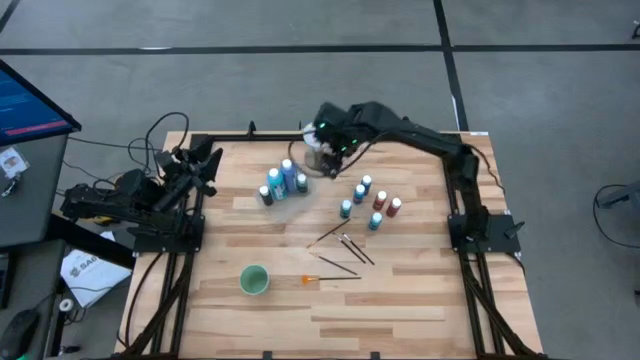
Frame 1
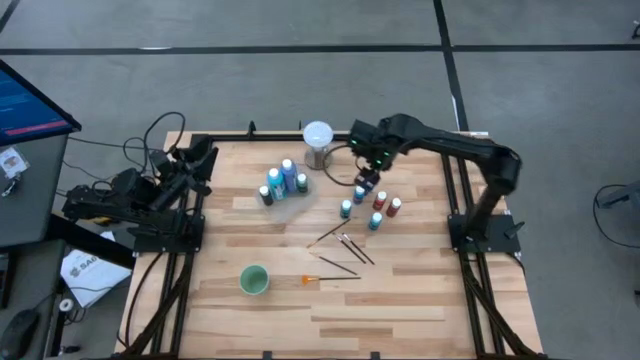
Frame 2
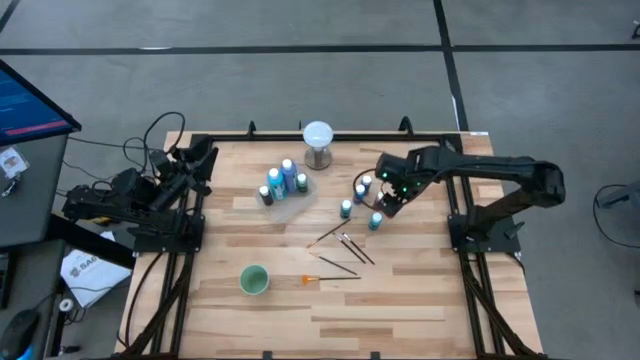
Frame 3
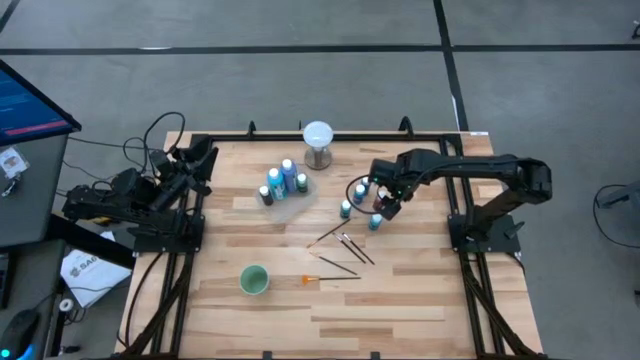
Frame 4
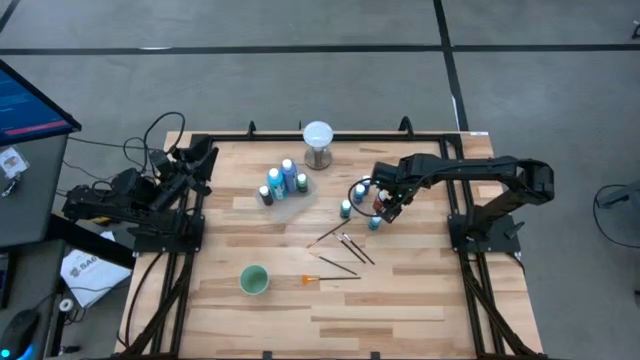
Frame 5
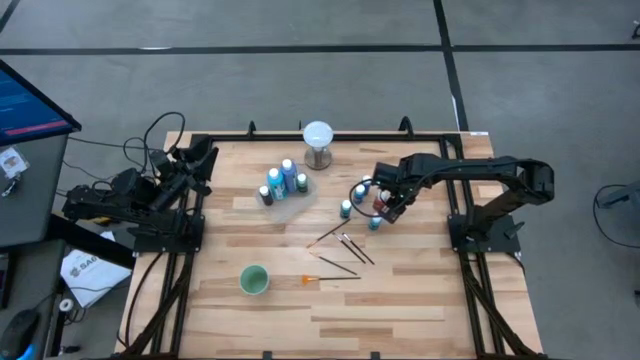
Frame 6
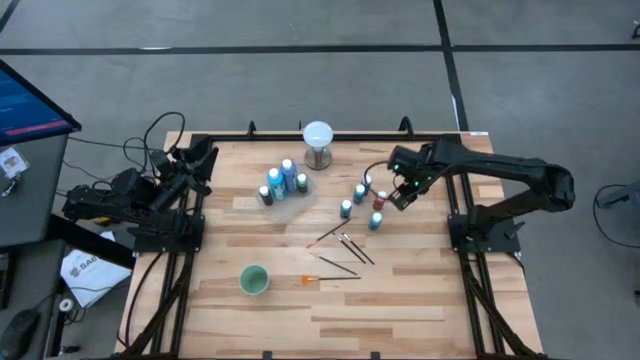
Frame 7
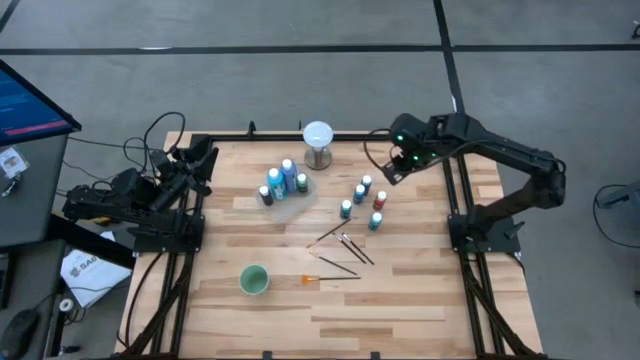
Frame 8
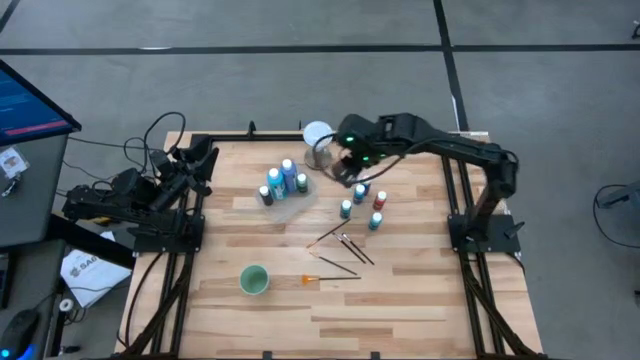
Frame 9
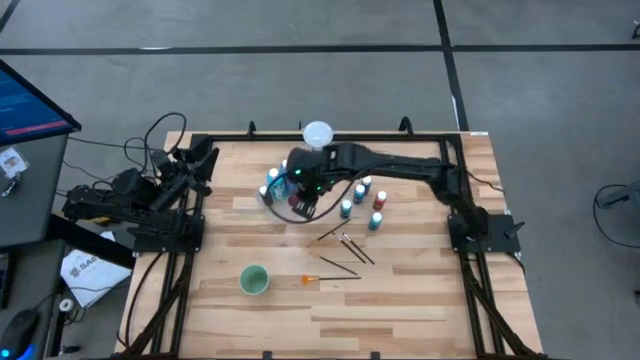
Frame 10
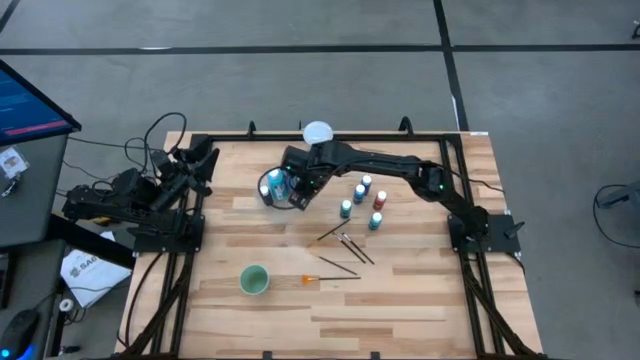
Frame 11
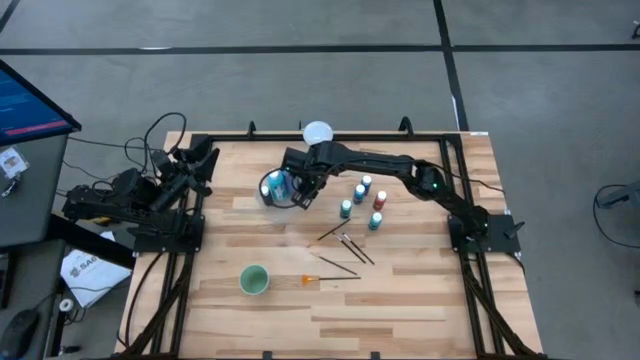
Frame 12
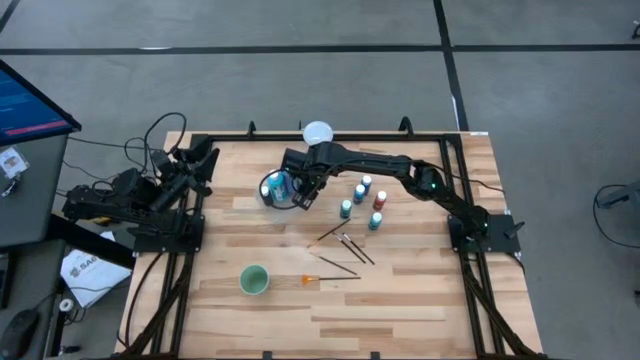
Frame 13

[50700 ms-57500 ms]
Task: Pick & Place Paint Supplies
Put the small red bottle into the white bin

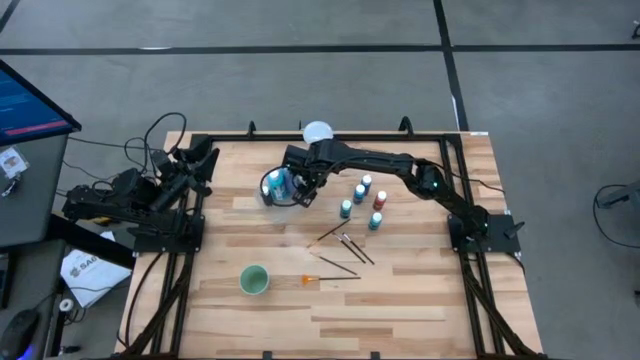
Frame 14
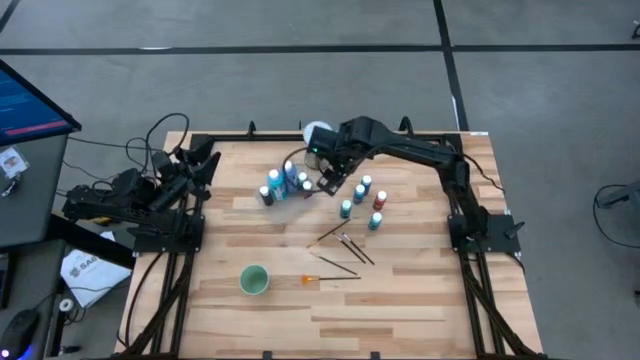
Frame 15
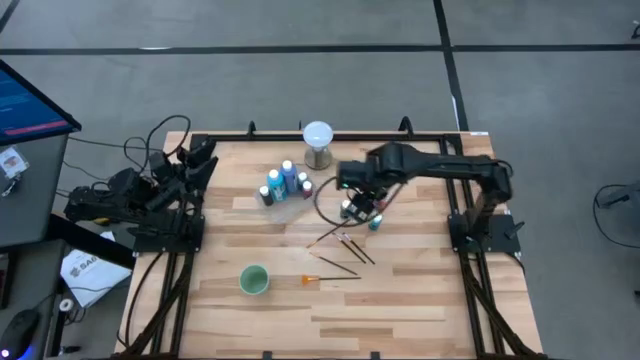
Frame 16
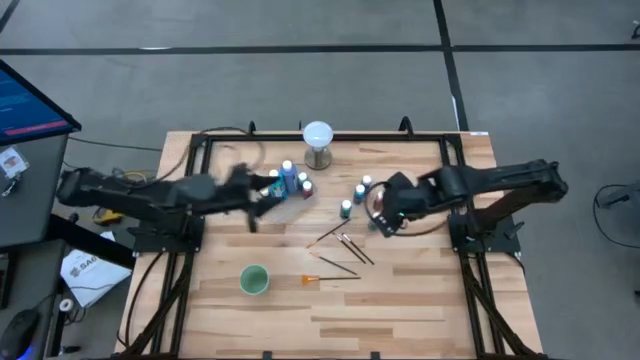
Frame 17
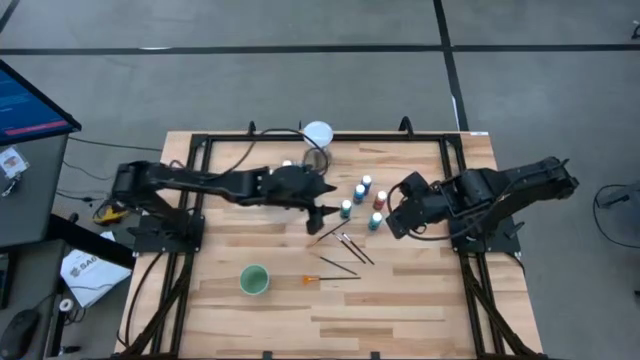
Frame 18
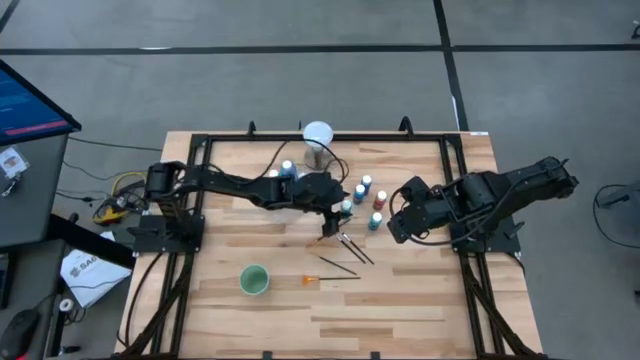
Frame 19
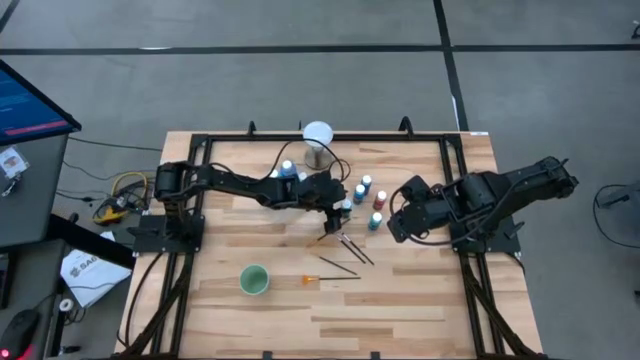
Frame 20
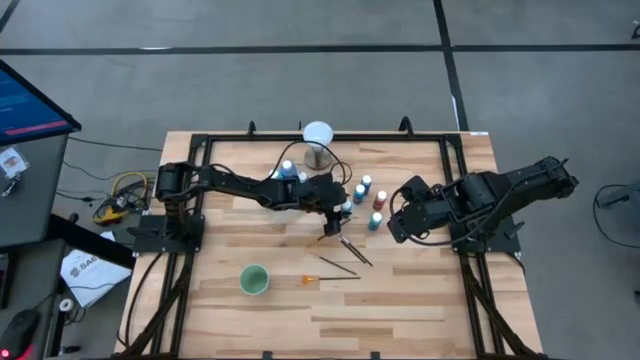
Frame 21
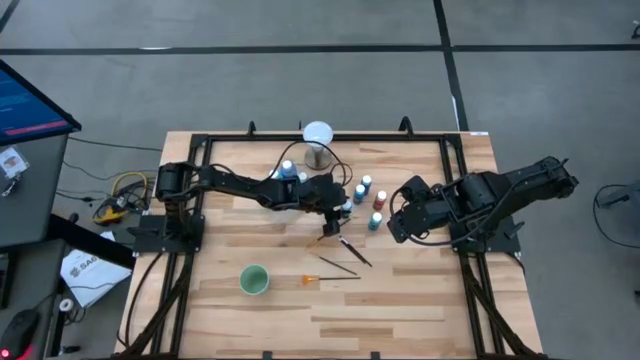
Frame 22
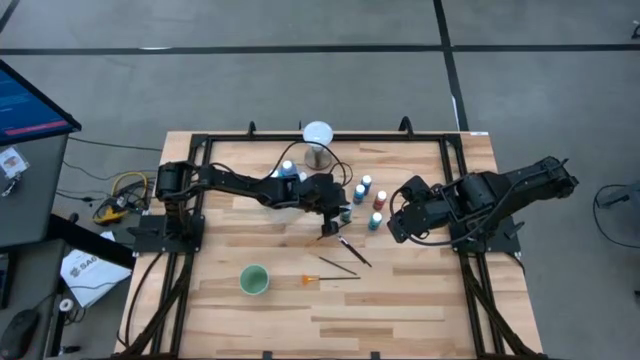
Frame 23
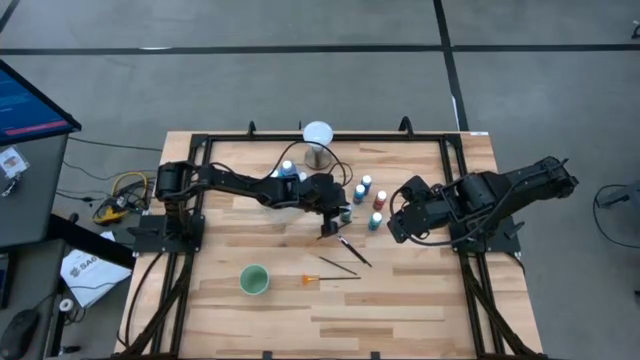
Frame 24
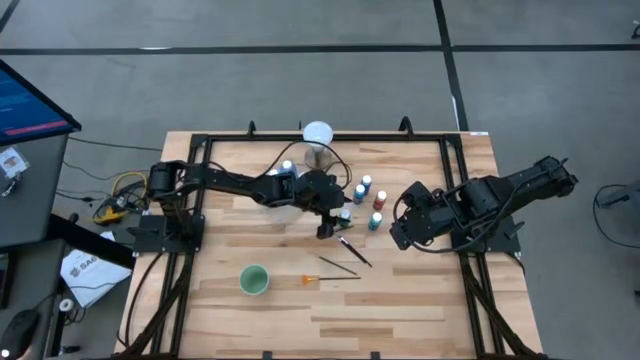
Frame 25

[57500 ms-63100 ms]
Put the small light blue bottle into the white bin

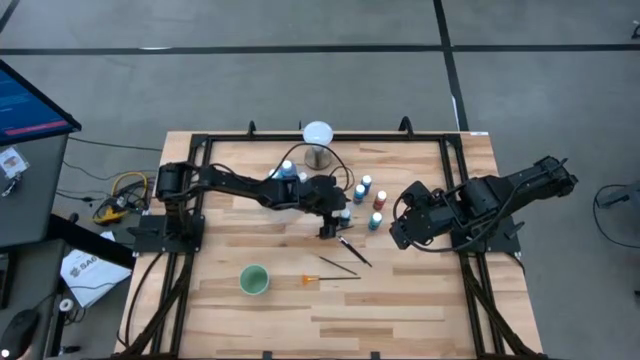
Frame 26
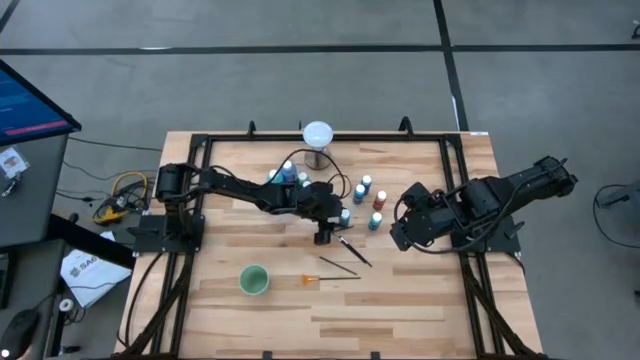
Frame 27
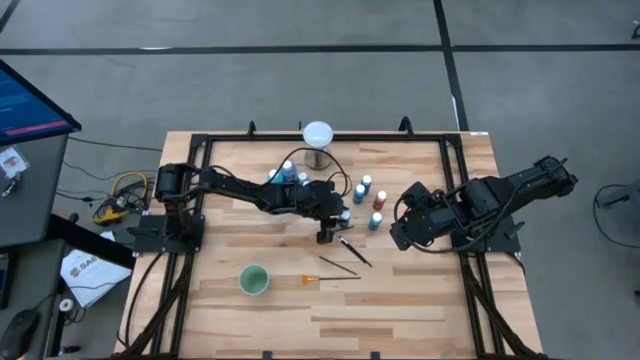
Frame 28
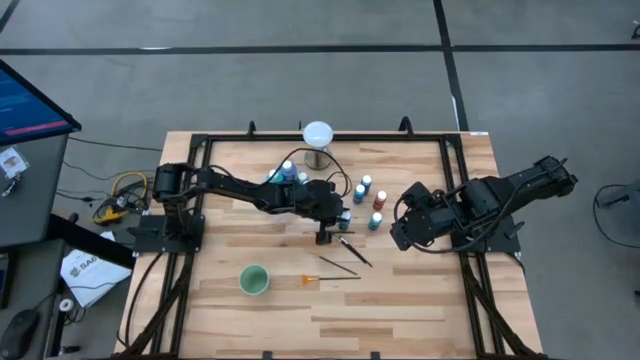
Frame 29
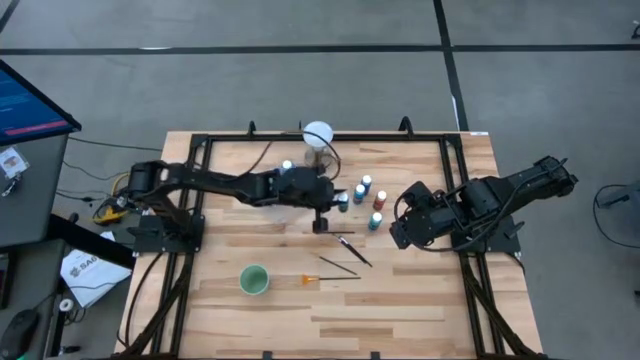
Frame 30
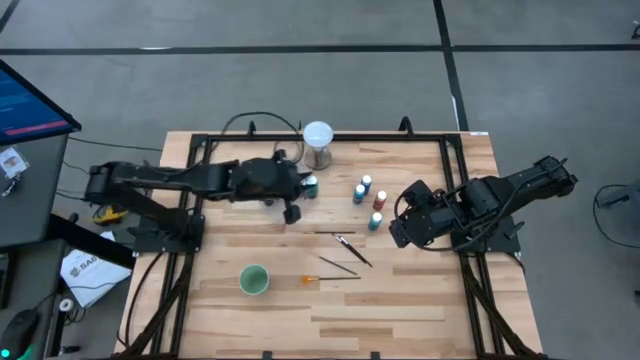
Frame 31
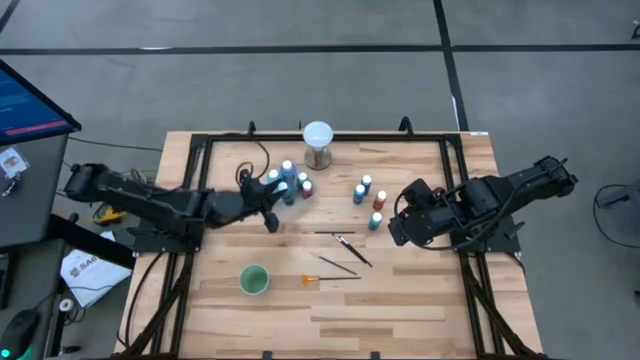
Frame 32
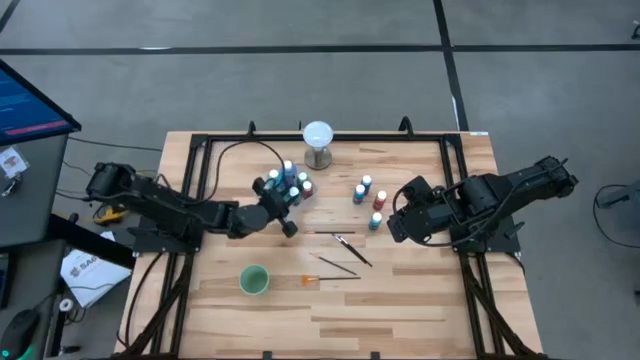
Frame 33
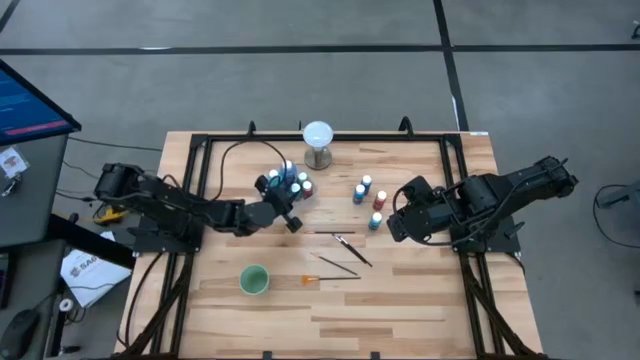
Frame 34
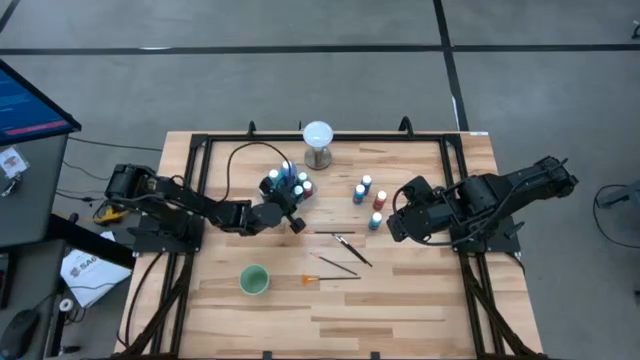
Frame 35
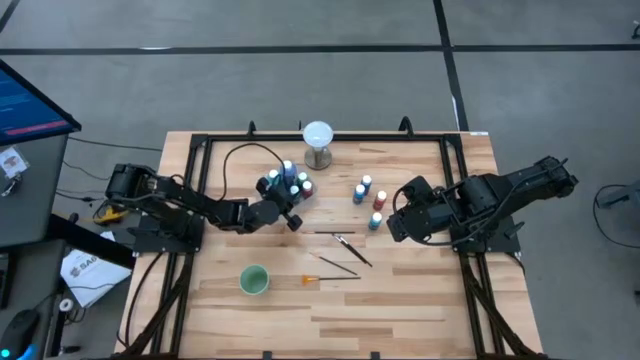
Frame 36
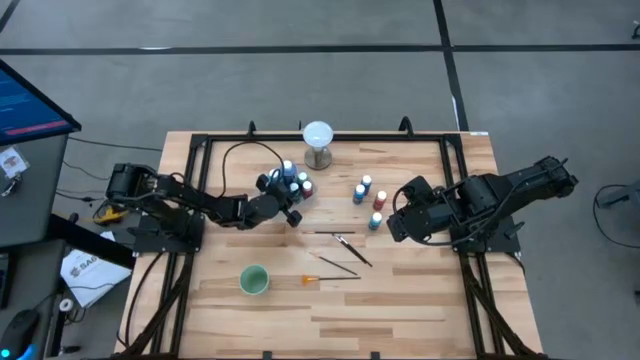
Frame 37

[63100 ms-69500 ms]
Put the small light blue bottle into the white bin

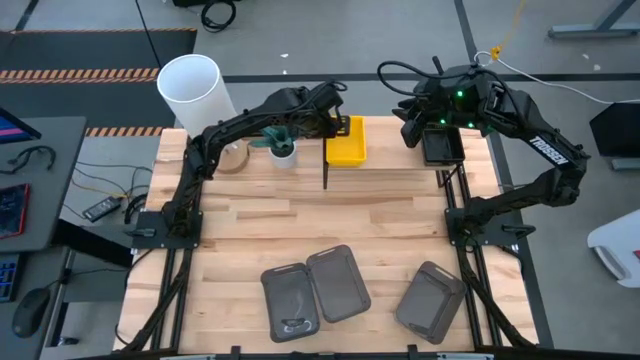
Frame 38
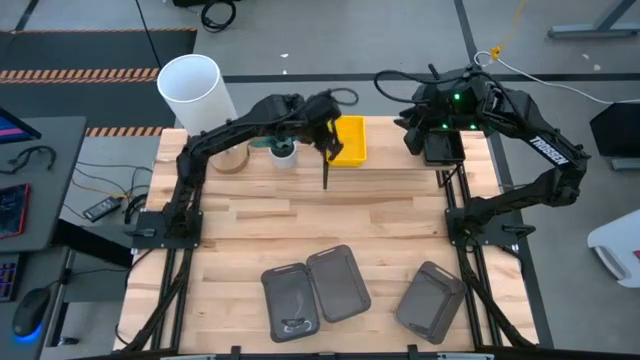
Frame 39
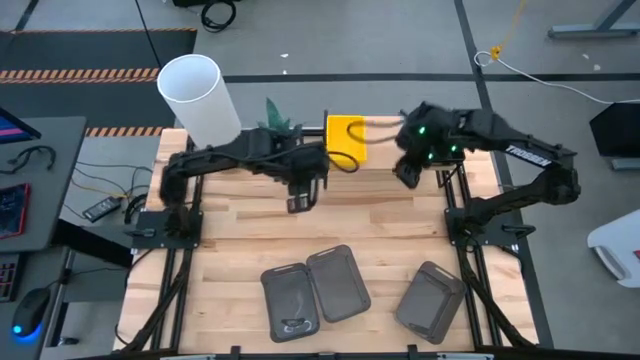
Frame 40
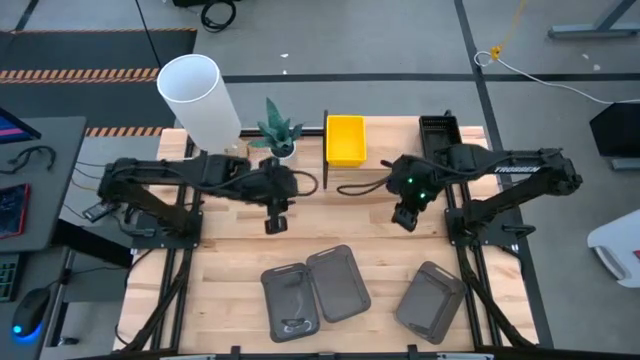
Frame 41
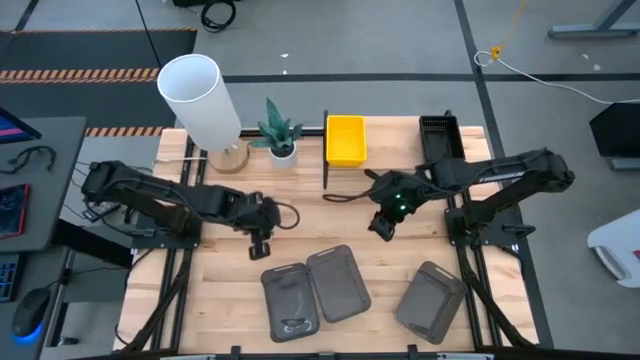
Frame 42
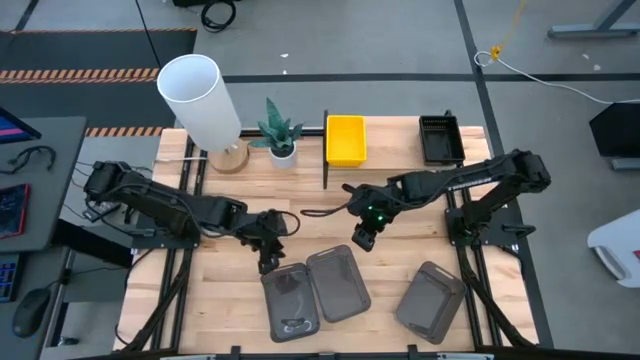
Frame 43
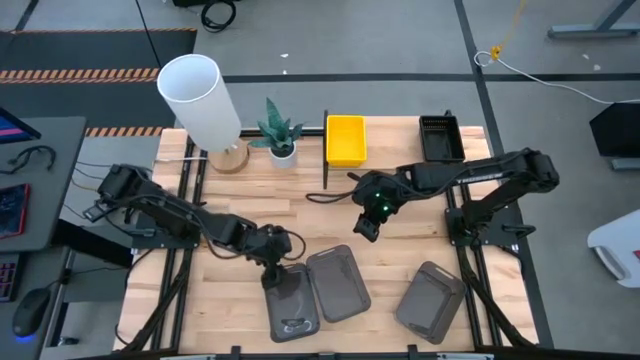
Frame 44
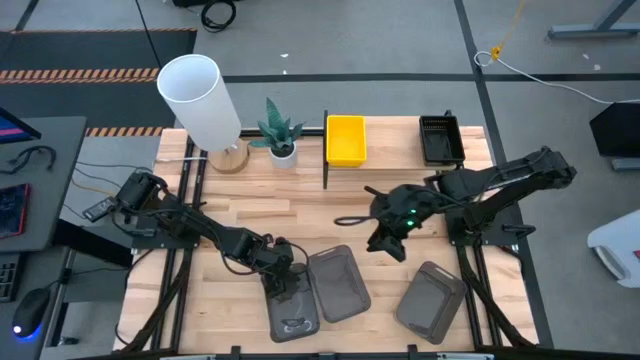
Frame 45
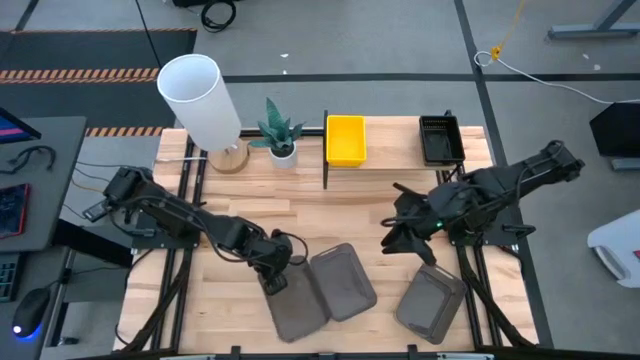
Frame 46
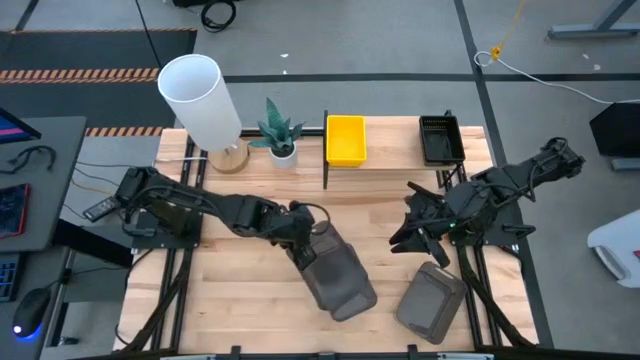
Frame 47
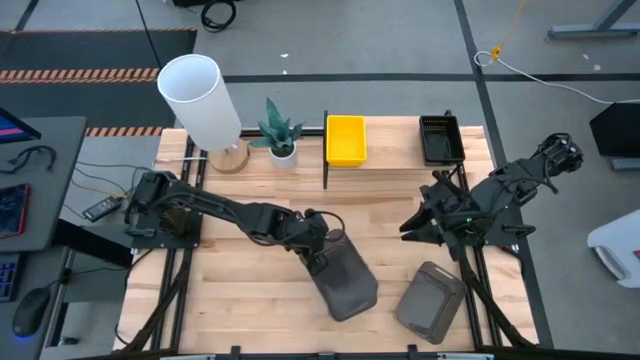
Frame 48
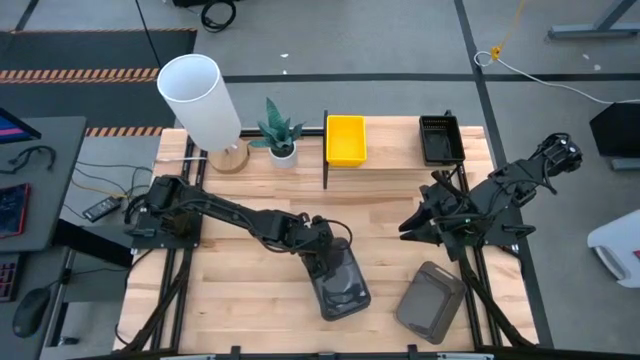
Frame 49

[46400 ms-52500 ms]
Task: Stack baskets on shelf by color
Stack the left gray bin on top of the middle gray bin
